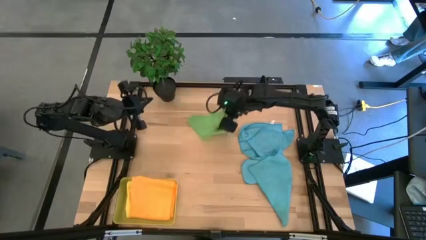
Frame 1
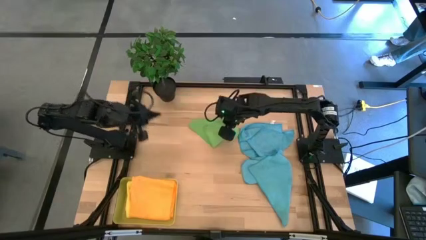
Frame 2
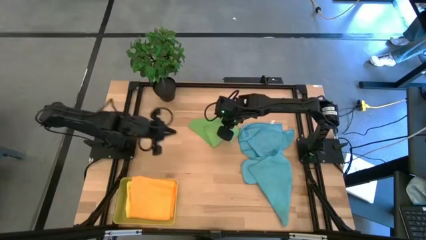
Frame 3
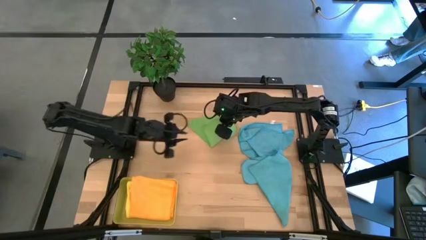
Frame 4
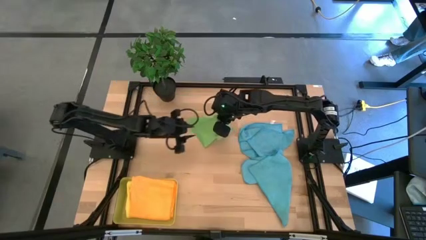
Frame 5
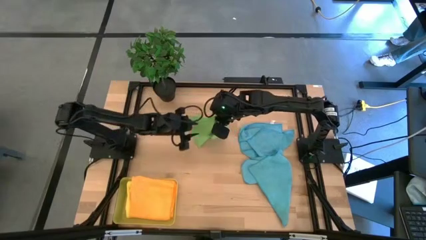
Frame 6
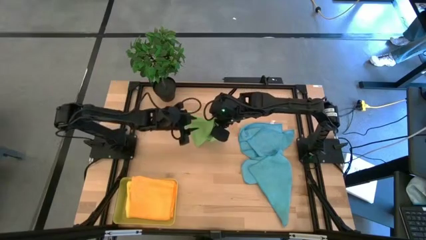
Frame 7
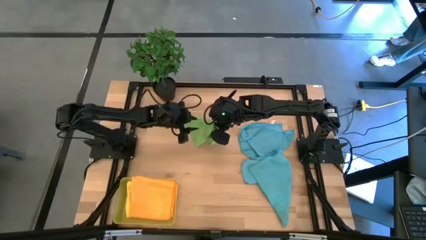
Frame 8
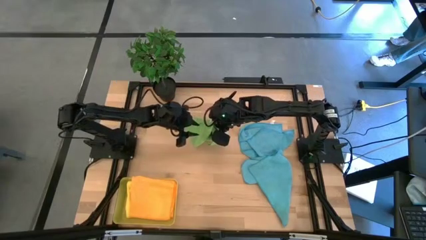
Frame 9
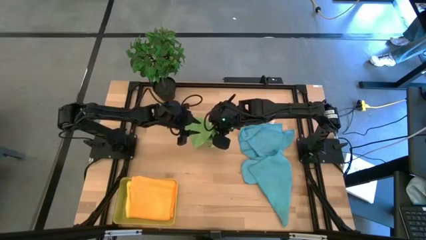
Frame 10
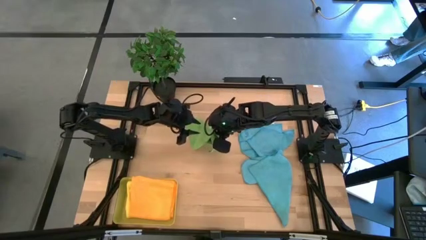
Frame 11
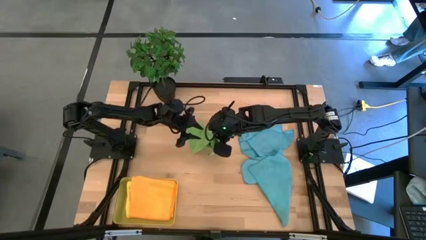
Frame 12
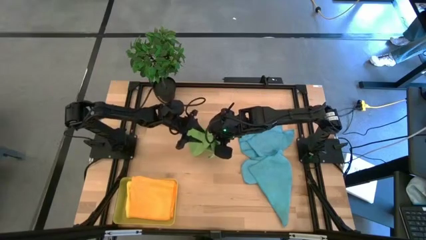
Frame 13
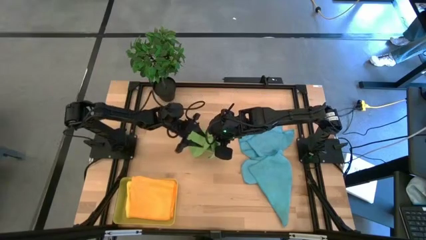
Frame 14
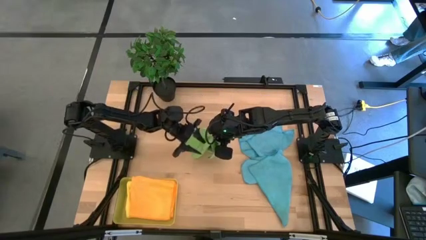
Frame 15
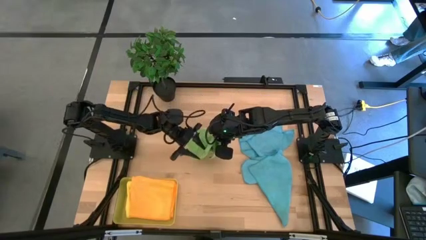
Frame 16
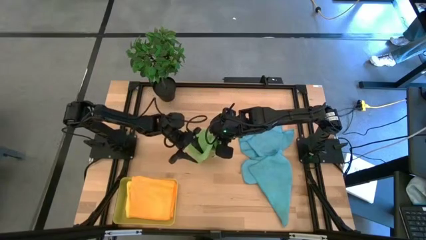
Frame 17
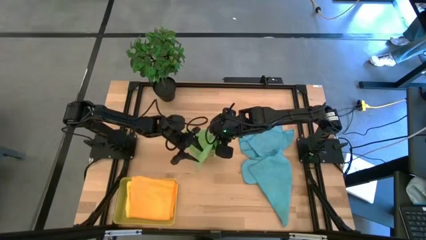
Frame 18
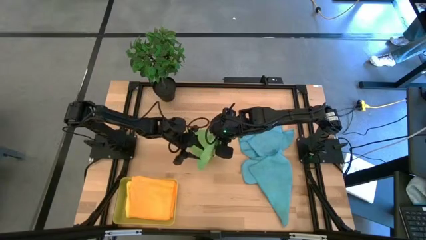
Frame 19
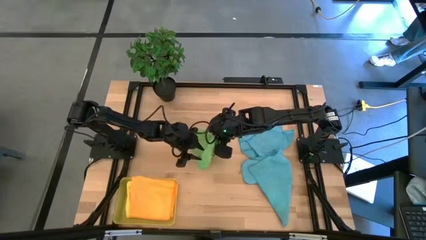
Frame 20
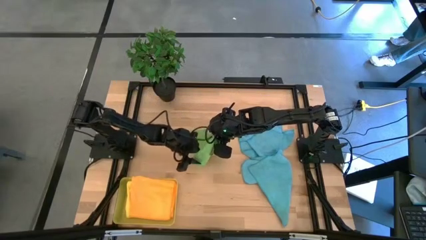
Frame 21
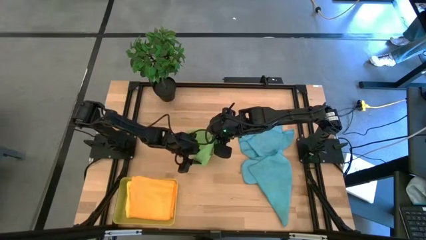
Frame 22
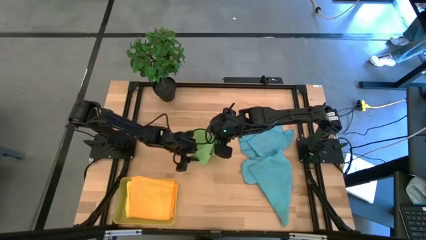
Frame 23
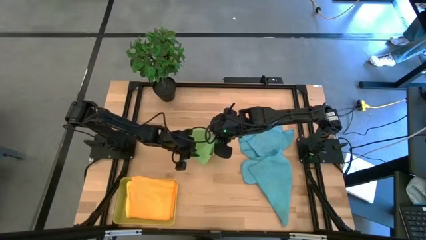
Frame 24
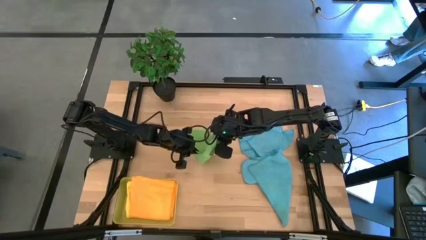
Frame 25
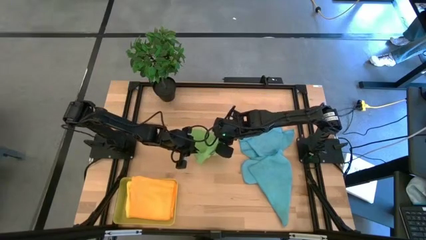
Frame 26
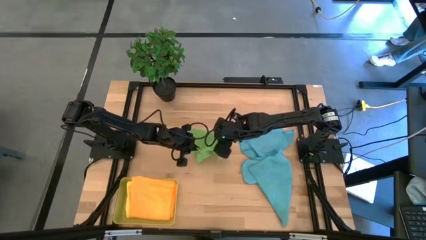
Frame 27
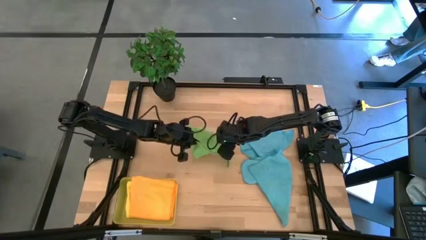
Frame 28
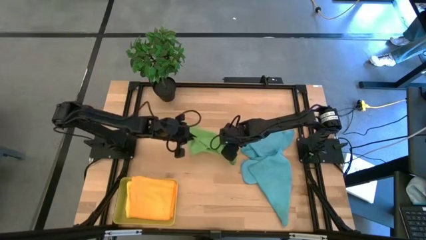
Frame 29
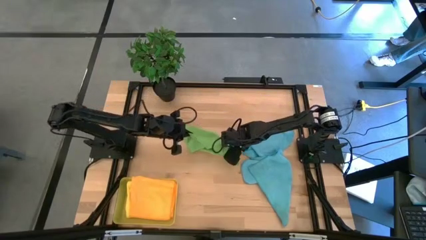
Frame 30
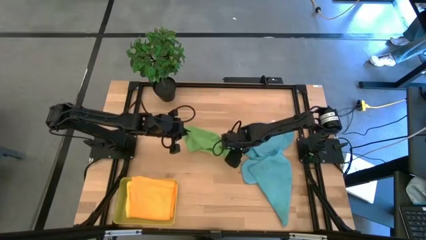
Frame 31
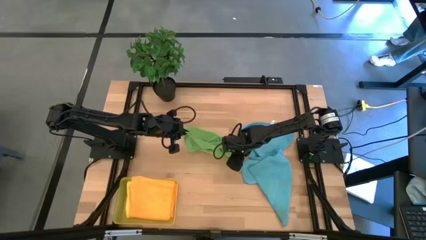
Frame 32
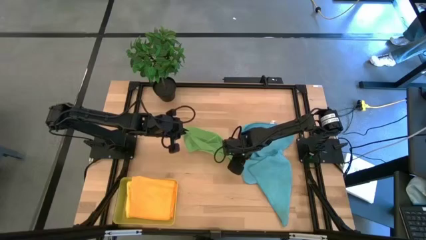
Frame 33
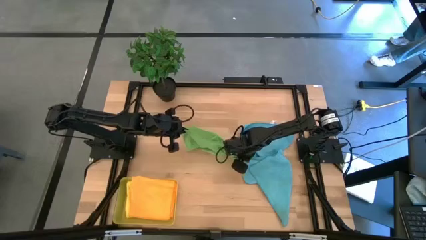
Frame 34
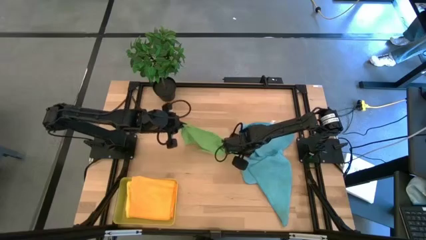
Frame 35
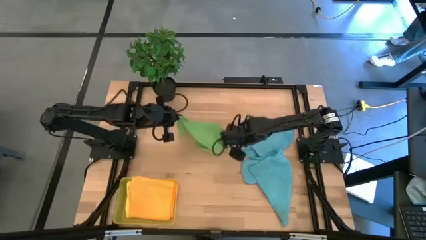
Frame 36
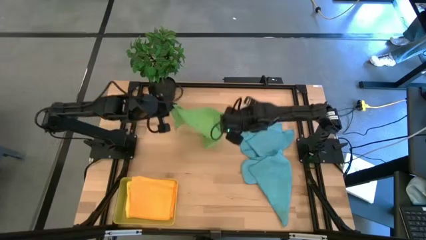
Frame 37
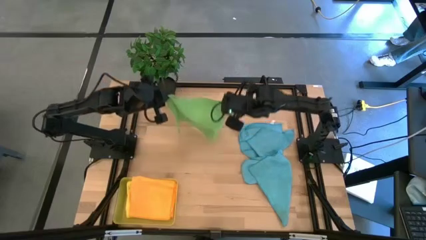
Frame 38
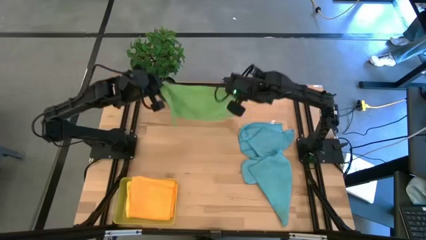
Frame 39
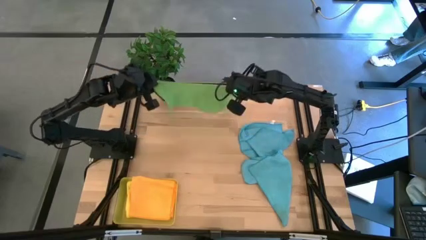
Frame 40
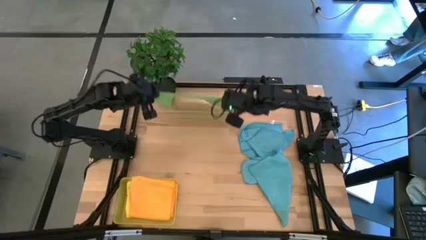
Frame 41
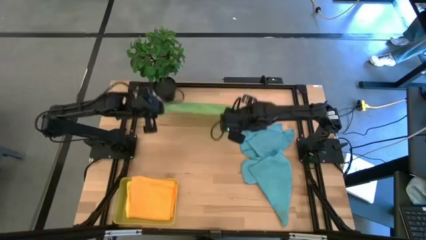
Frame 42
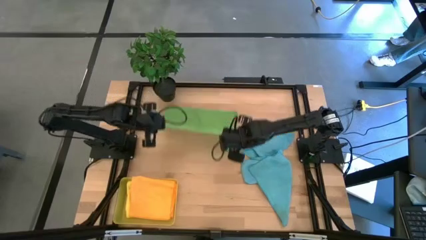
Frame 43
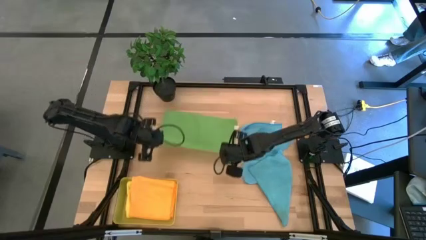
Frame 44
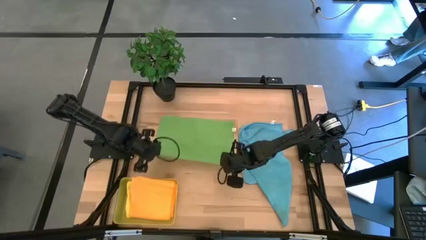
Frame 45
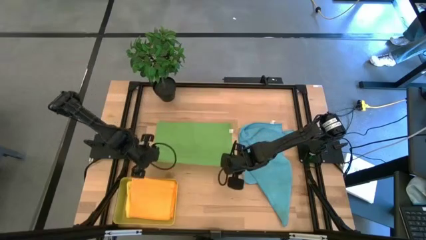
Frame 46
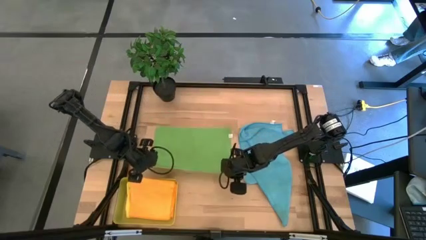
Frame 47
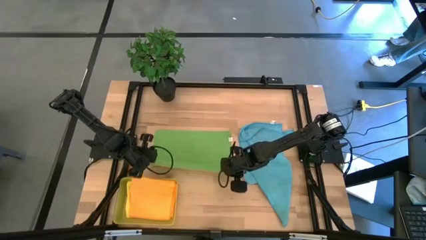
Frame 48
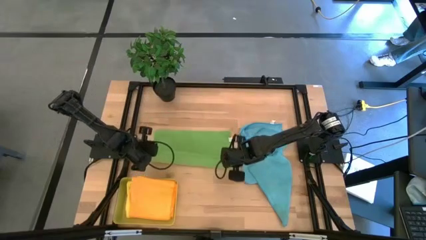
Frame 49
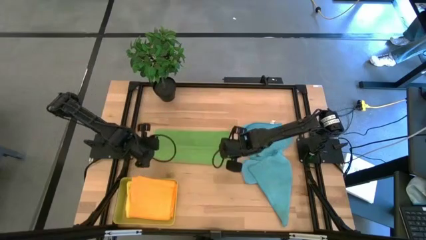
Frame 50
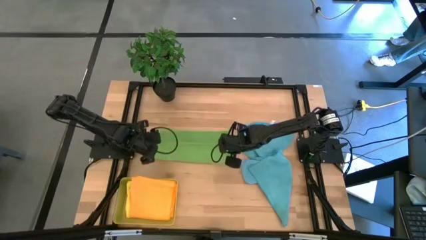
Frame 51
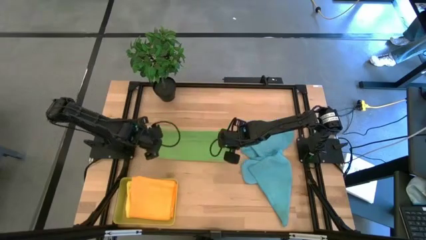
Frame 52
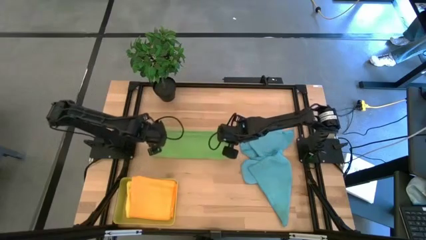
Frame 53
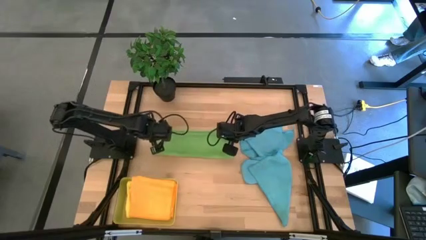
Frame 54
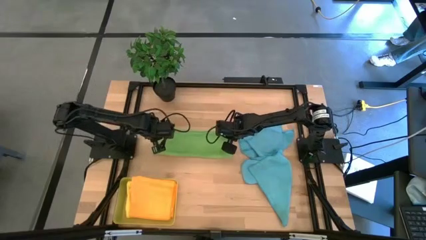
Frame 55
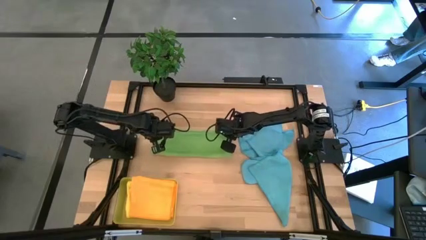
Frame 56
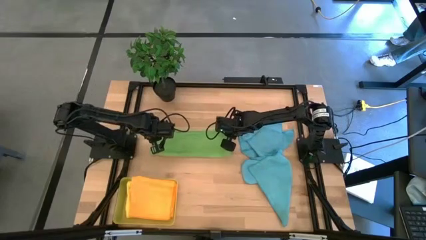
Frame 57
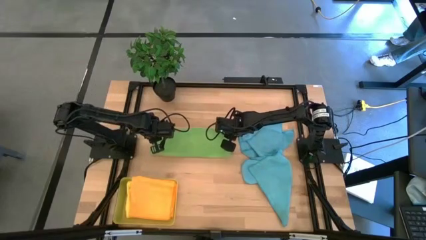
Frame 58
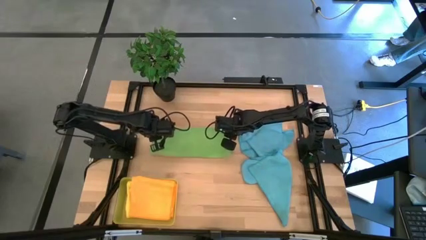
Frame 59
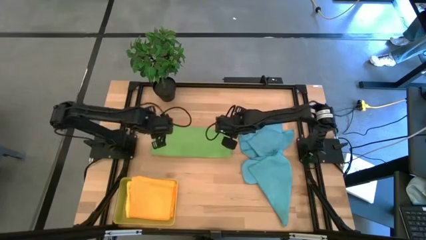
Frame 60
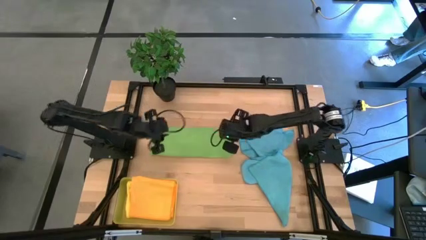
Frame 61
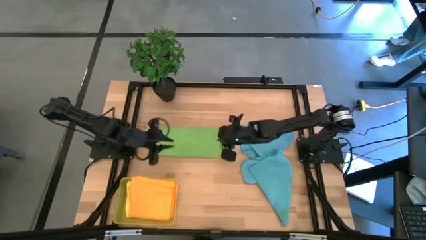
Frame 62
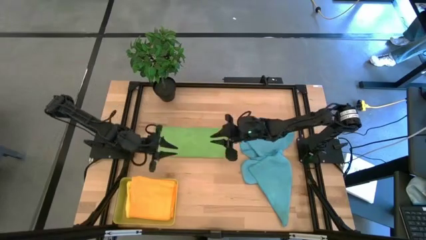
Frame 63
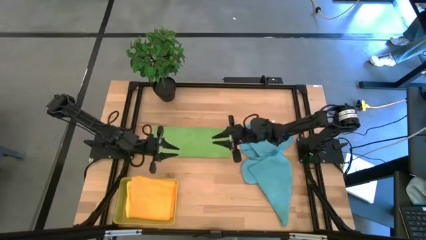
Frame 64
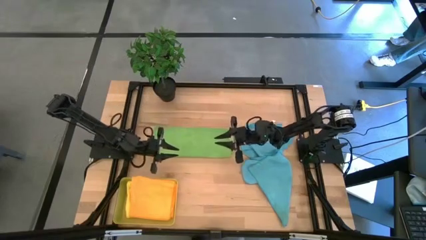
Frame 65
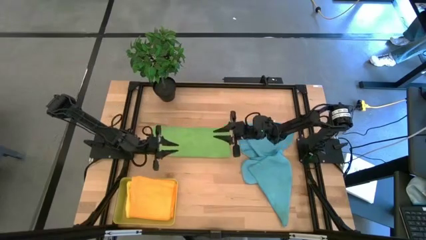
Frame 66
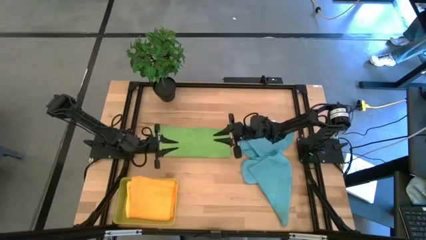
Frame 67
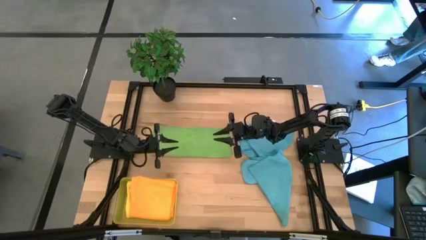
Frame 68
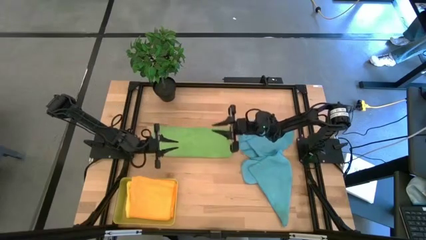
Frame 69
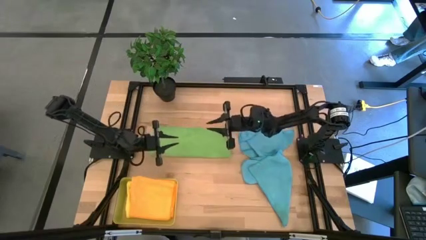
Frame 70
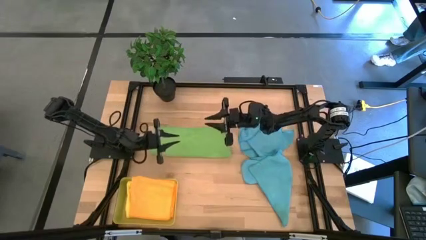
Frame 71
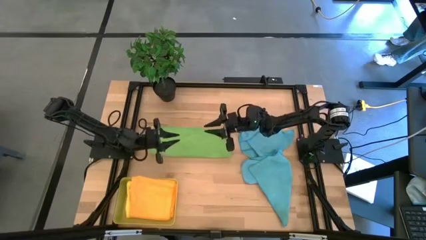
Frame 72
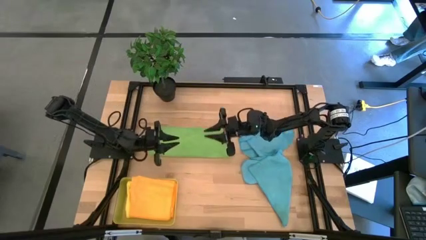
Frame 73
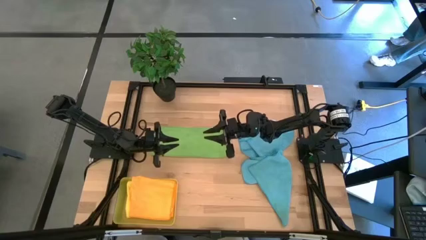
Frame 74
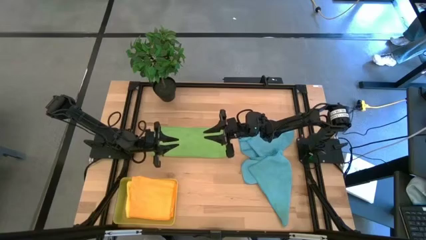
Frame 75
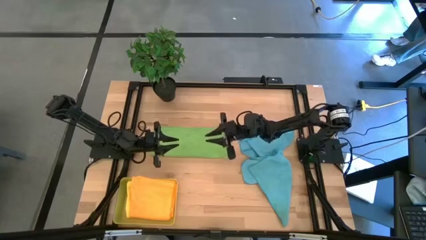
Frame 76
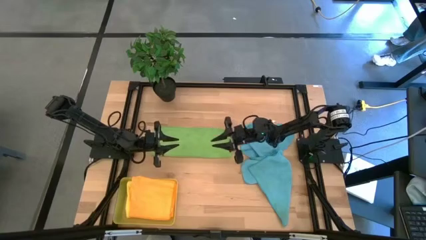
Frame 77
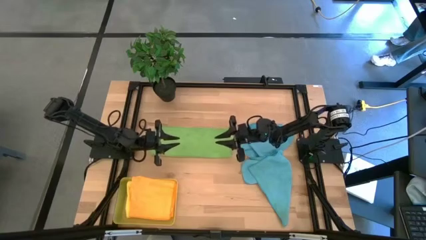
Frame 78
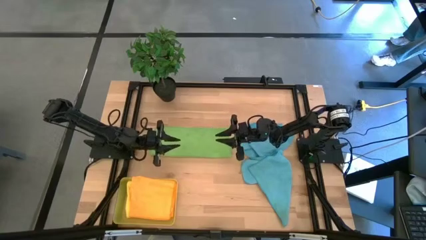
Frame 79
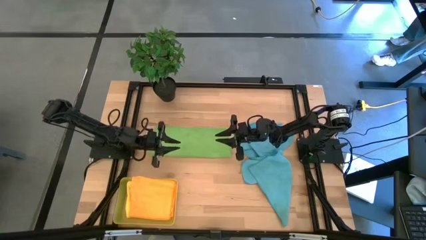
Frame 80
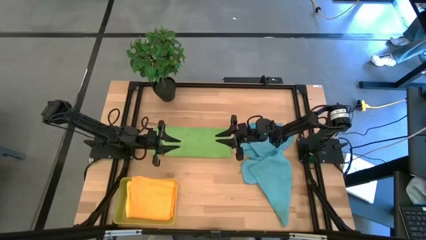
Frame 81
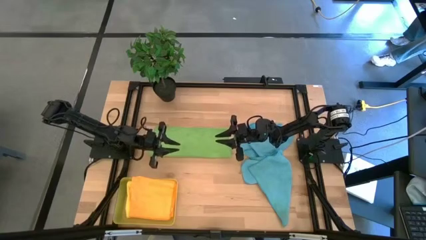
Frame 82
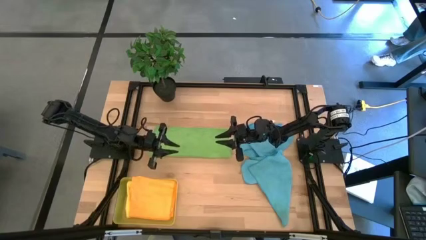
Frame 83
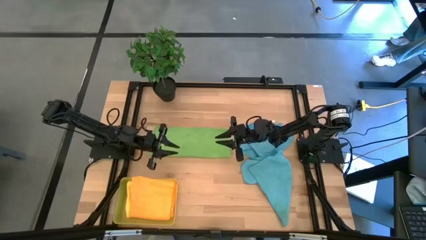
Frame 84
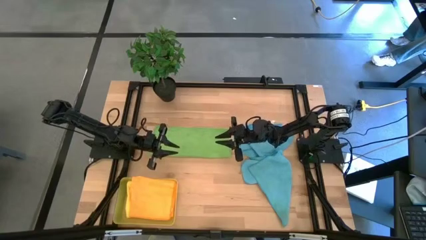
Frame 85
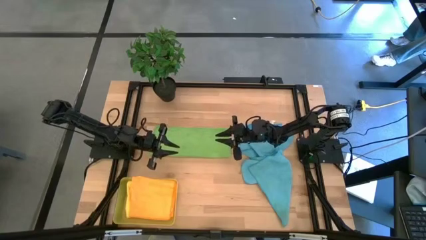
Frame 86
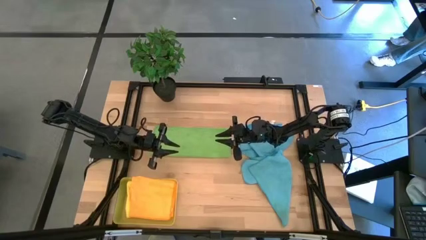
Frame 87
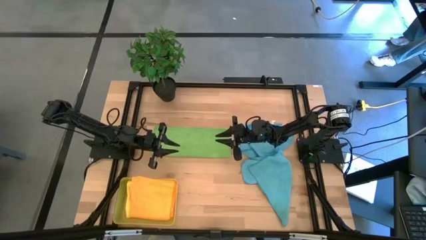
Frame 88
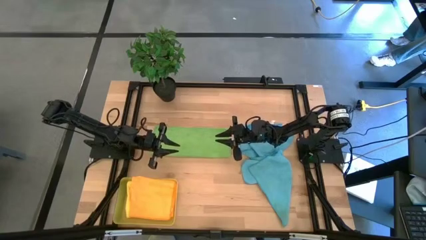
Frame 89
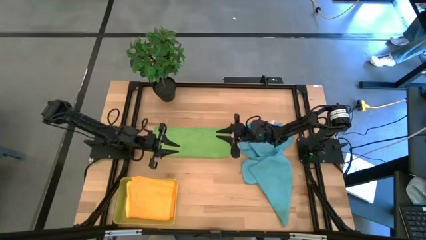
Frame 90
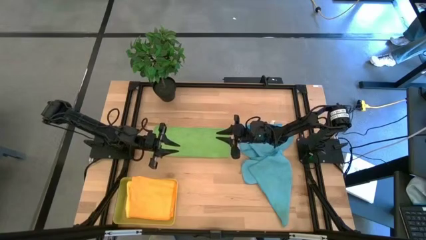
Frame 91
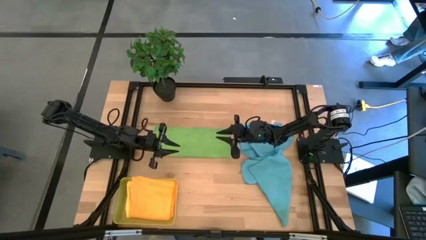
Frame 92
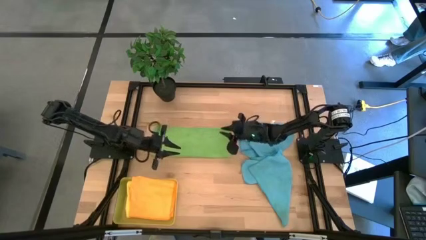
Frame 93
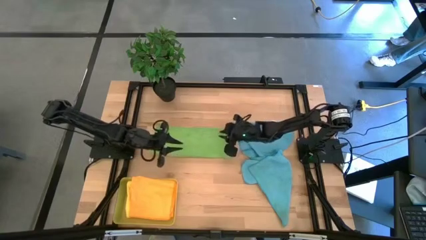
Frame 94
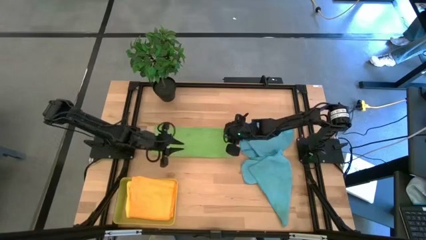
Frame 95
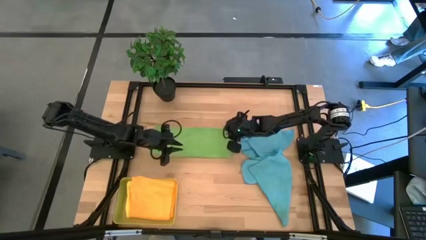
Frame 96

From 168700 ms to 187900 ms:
Task: Fold microfiber towels
Fold the green microfiber cloth
